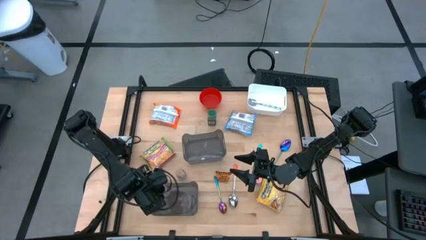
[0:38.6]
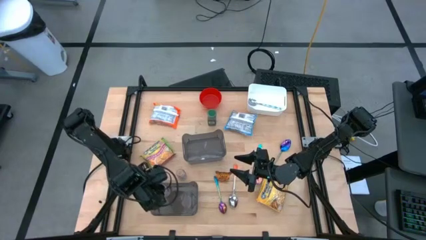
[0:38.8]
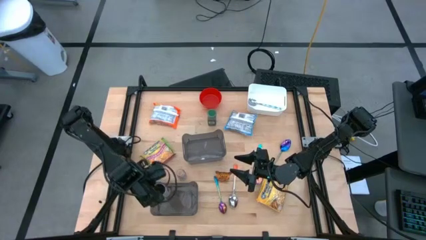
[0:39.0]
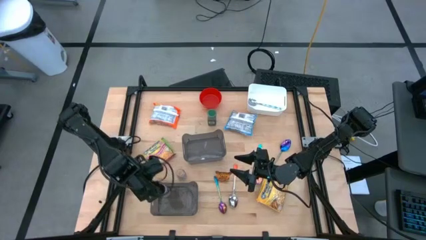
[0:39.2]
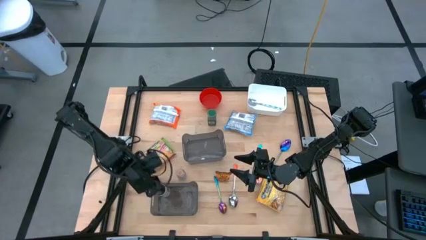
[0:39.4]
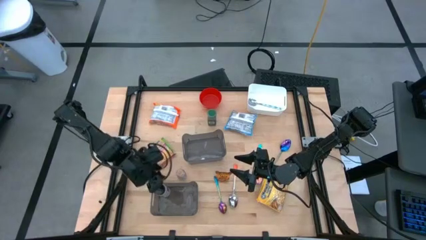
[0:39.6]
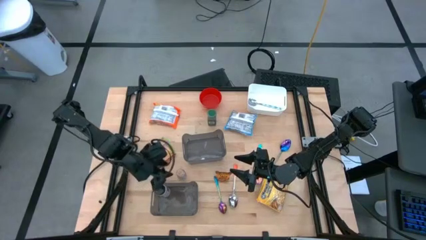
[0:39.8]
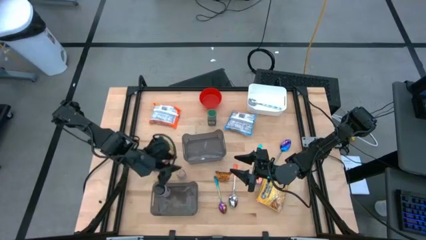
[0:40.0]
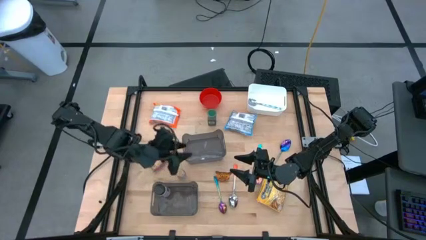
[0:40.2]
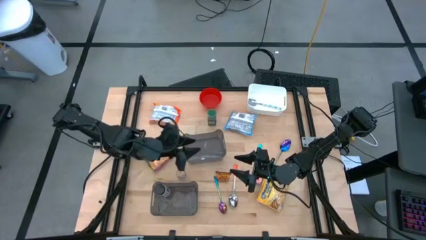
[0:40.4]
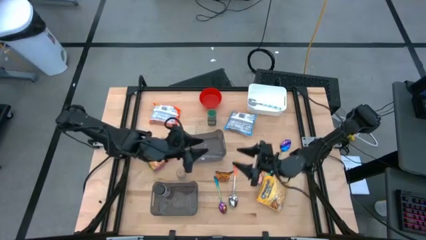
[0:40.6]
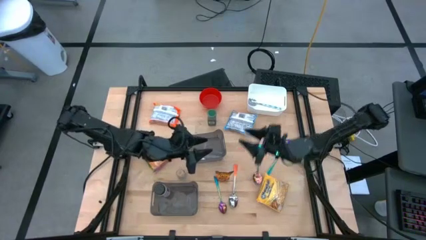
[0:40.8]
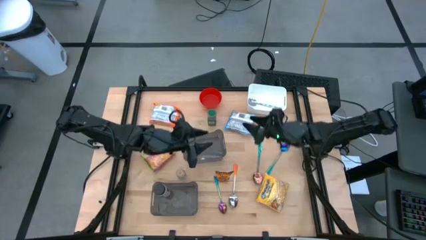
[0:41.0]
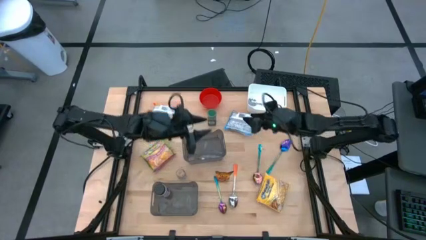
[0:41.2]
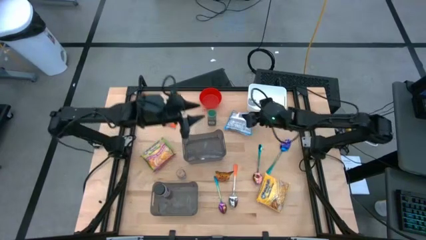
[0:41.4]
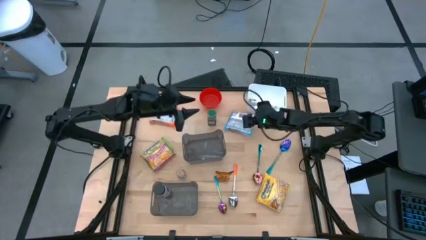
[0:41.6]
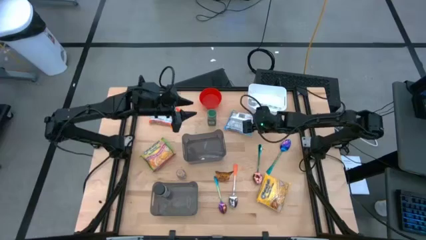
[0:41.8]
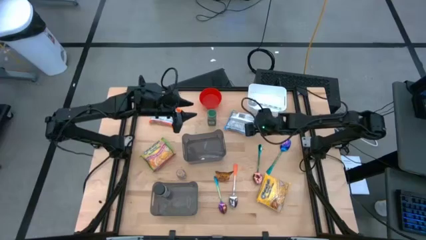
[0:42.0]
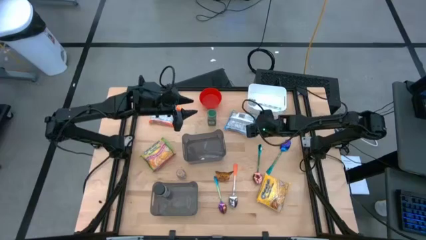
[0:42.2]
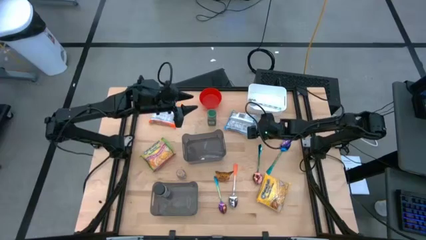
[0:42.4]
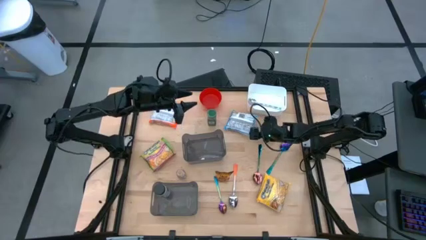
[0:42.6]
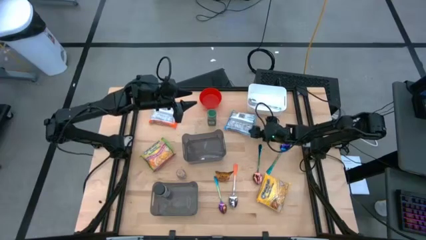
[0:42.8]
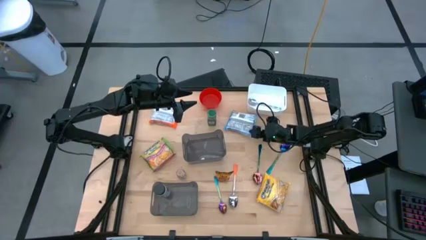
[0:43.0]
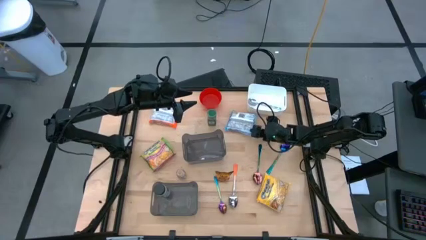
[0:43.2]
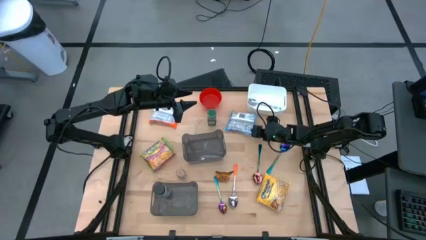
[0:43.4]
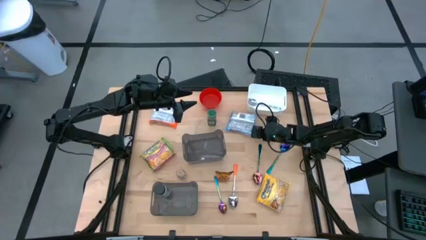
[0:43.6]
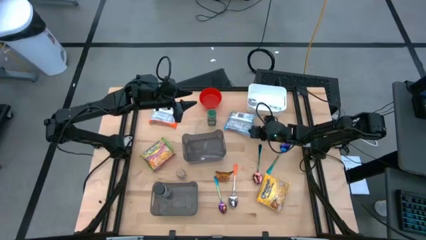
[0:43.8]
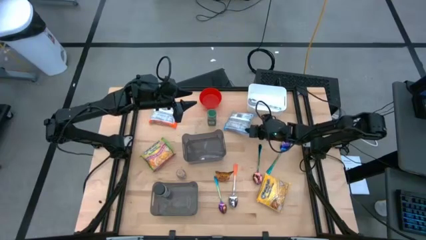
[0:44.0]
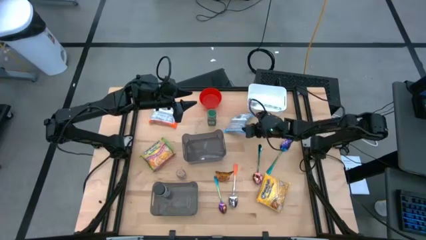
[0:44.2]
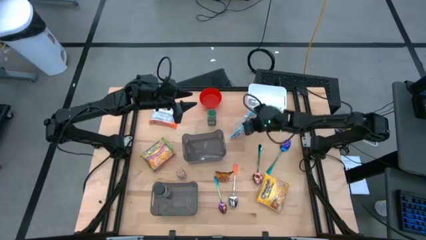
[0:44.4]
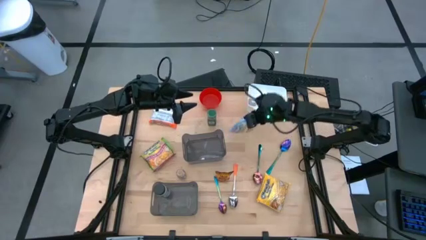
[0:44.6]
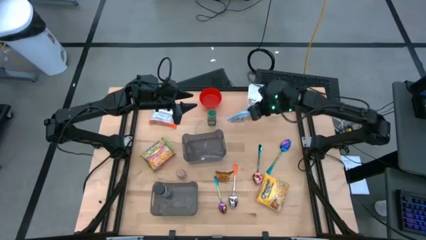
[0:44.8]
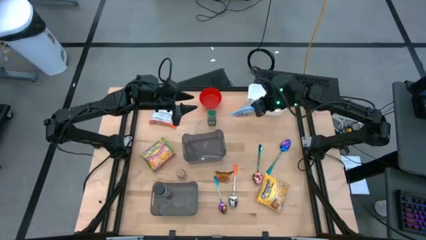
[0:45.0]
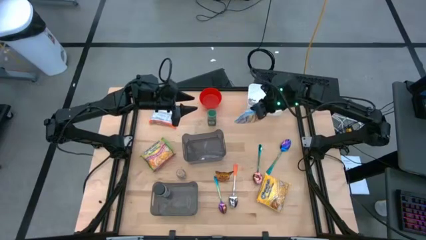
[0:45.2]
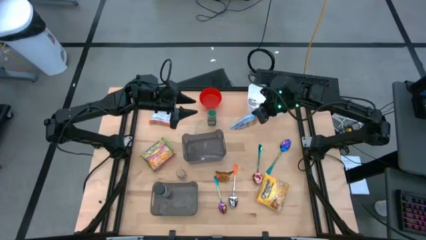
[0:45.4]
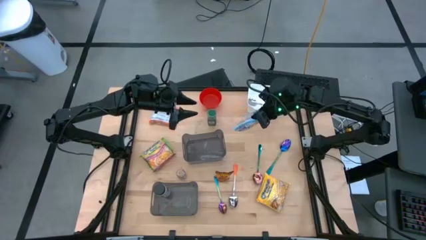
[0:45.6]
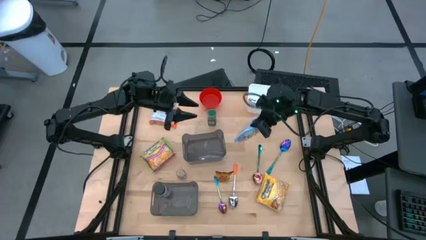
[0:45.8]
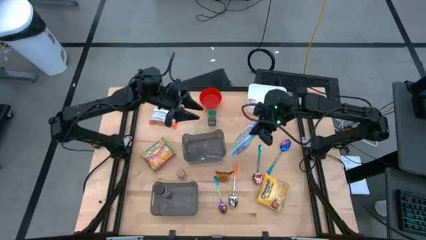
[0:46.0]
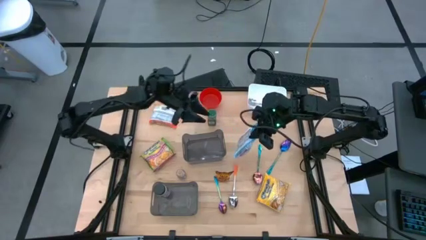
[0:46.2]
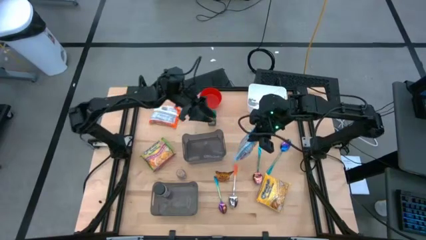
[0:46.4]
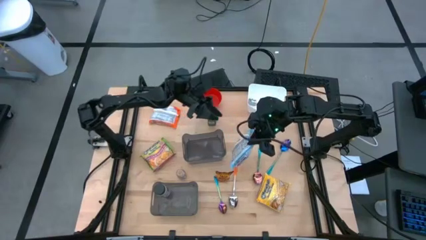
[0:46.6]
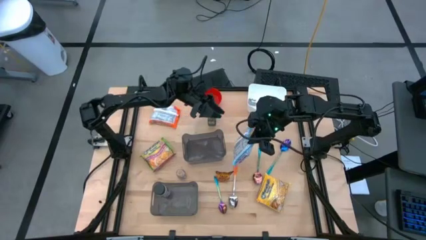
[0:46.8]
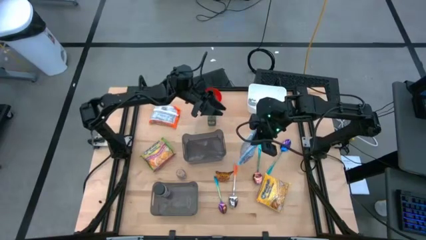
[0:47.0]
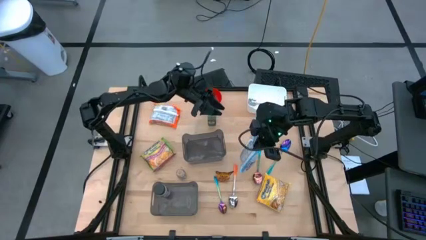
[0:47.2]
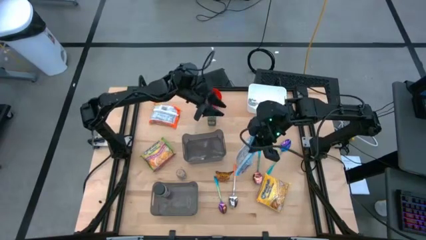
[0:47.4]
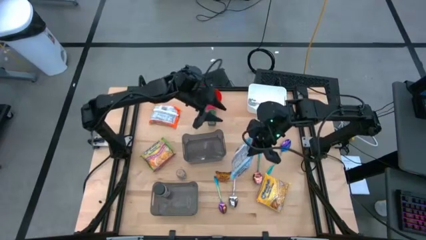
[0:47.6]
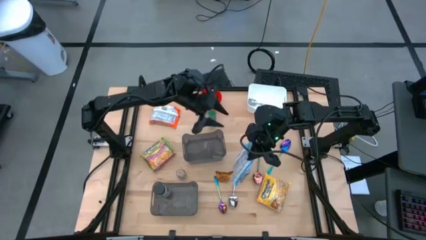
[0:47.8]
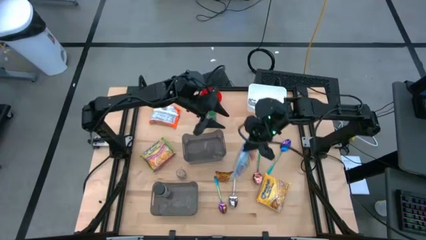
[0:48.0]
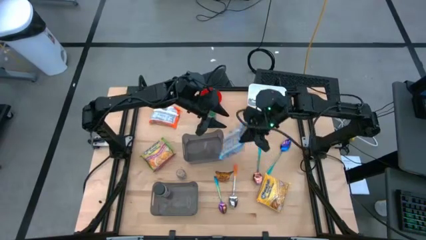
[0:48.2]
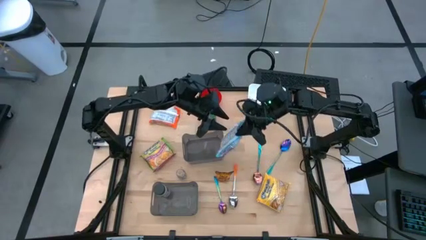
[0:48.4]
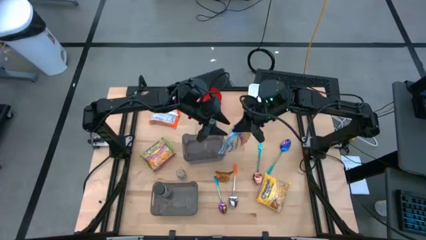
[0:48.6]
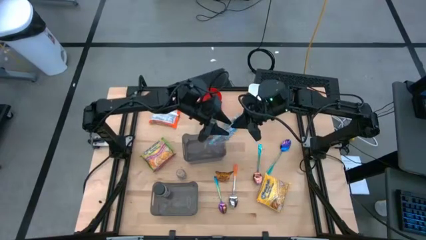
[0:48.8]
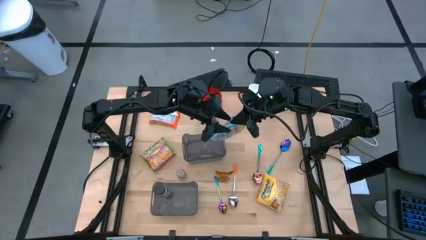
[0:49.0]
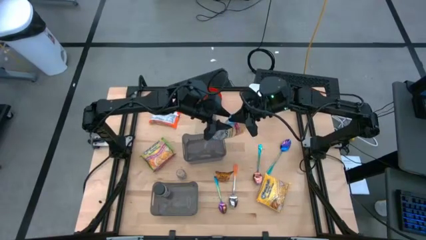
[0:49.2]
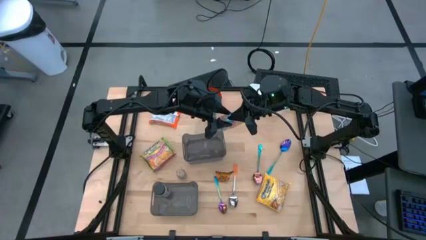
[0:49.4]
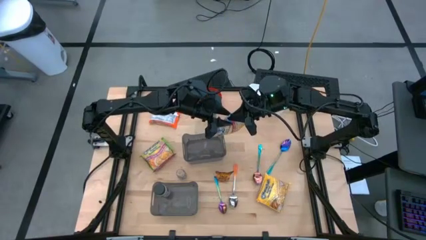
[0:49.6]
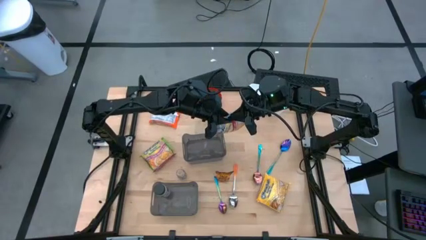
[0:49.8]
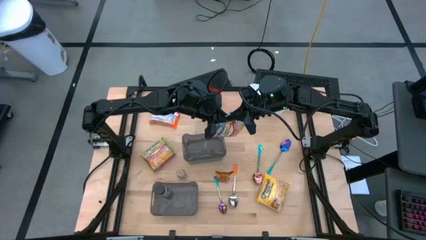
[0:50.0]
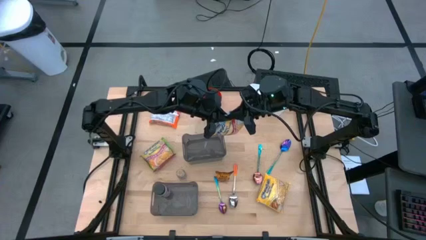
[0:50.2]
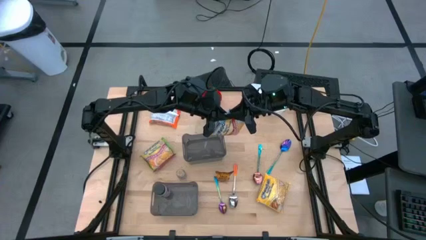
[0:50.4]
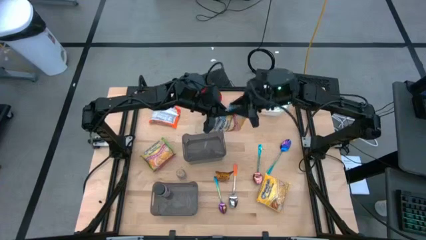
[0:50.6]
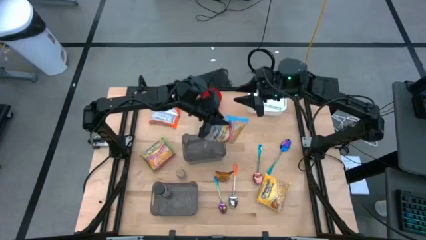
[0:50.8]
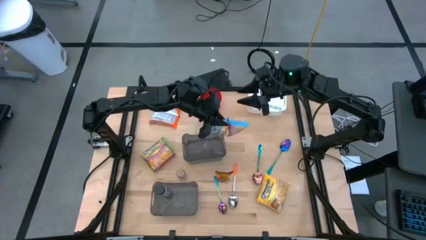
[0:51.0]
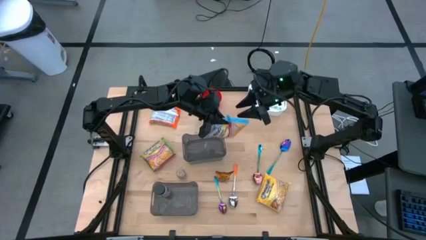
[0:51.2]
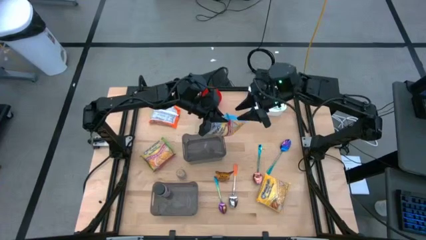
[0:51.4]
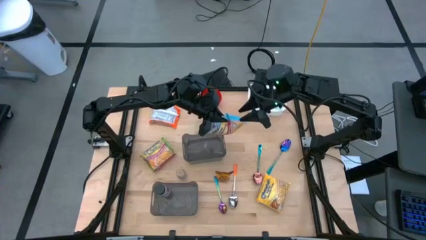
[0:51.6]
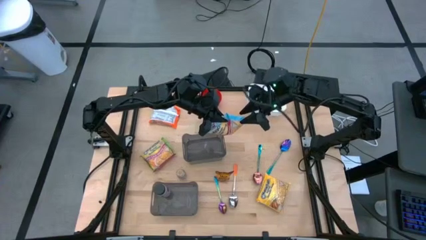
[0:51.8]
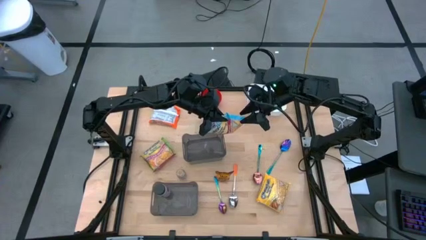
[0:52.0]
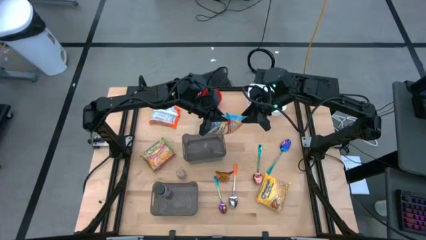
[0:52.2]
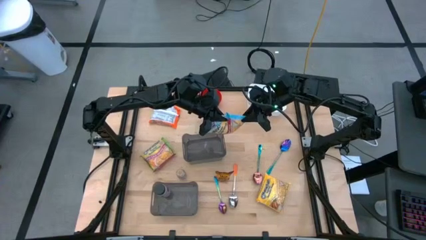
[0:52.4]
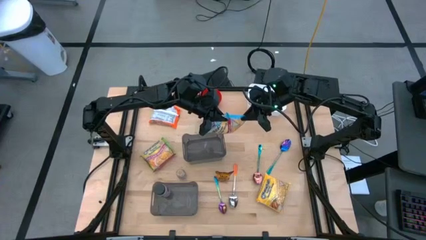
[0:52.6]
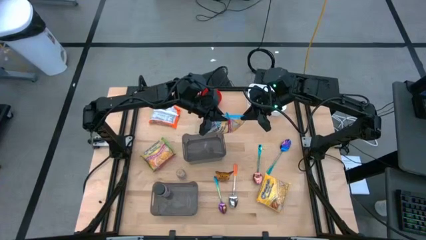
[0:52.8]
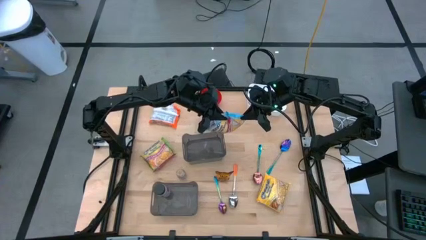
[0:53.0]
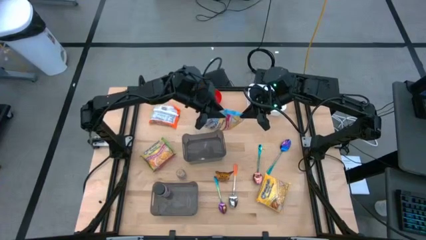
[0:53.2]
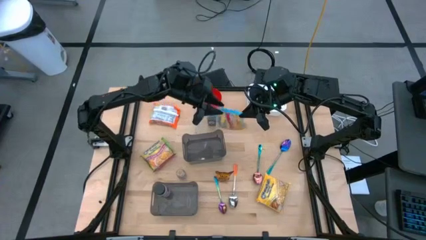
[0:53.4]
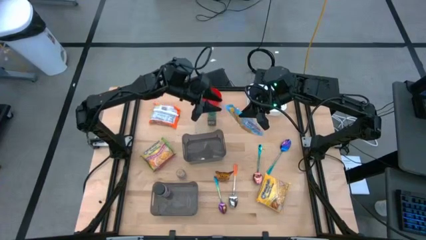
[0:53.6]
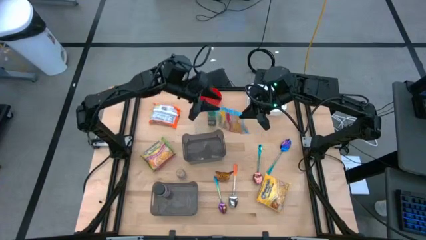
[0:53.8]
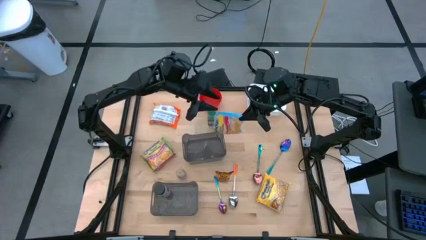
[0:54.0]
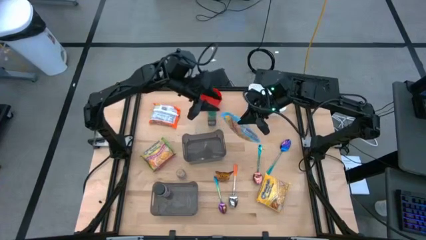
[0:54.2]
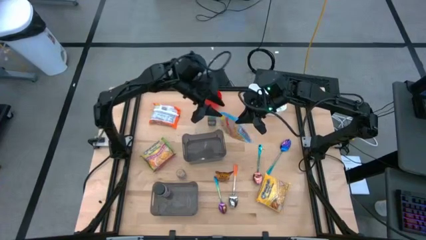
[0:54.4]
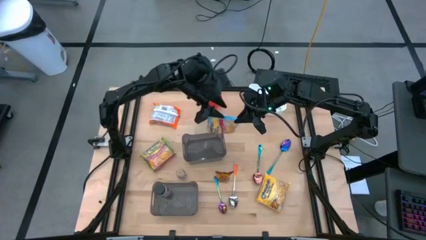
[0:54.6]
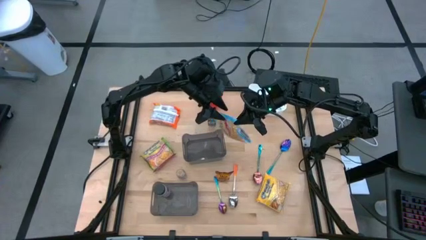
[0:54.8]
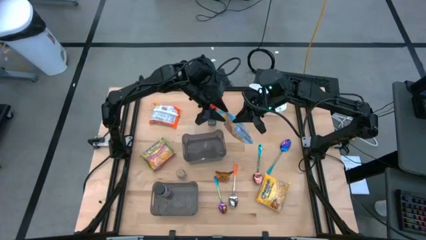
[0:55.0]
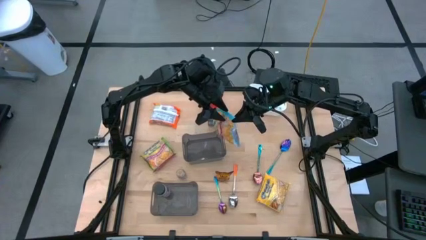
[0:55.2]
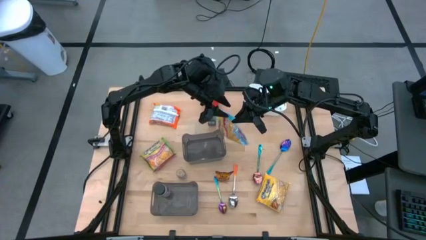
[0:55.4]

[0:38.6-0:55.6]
Task: Pick & Place Food Item
Put the blue noodle pack into the top black bin
